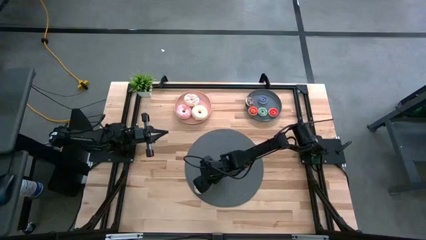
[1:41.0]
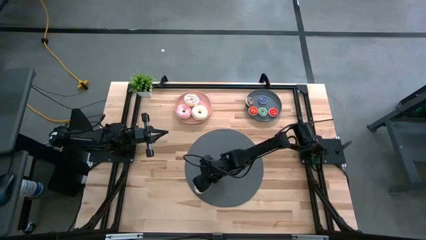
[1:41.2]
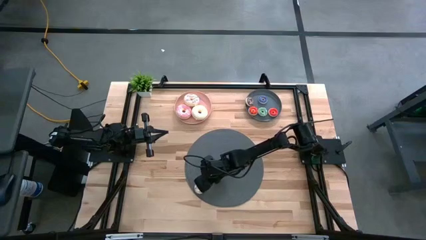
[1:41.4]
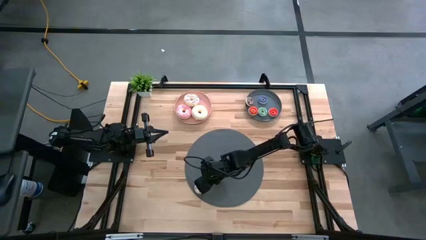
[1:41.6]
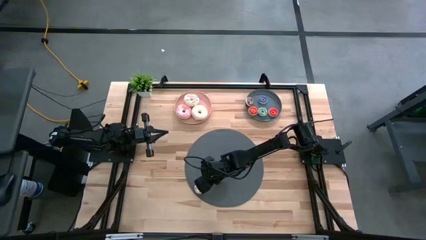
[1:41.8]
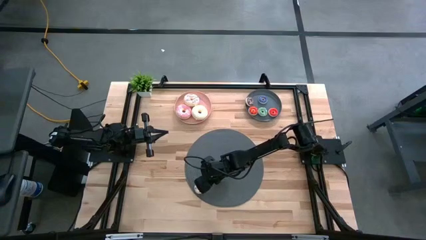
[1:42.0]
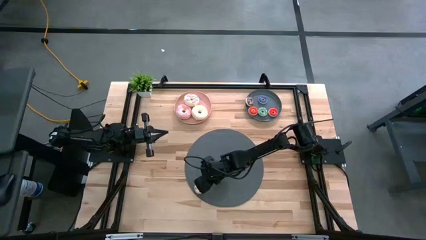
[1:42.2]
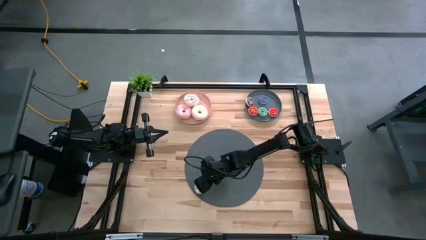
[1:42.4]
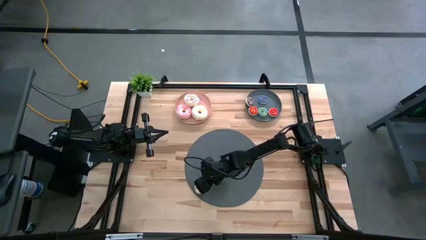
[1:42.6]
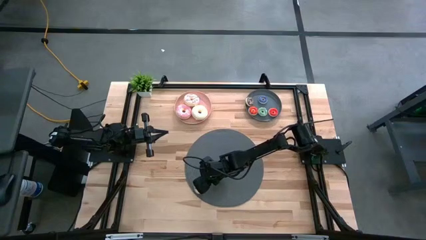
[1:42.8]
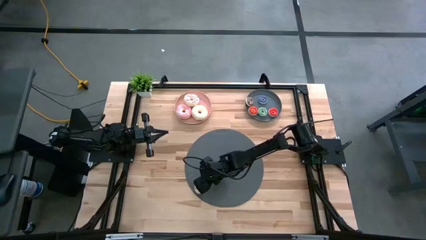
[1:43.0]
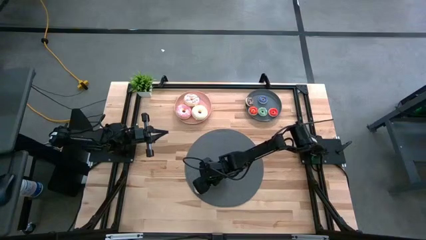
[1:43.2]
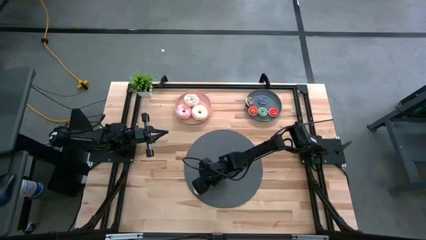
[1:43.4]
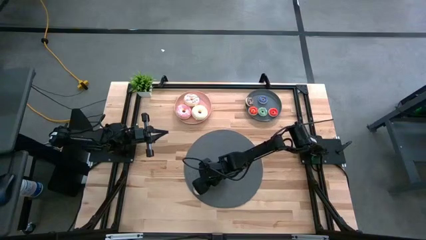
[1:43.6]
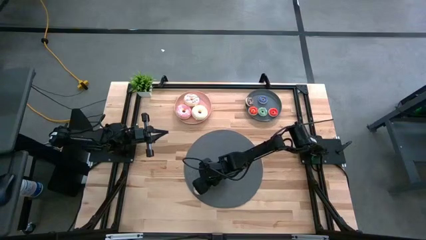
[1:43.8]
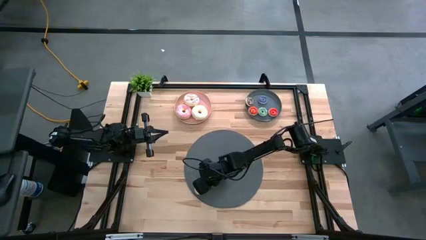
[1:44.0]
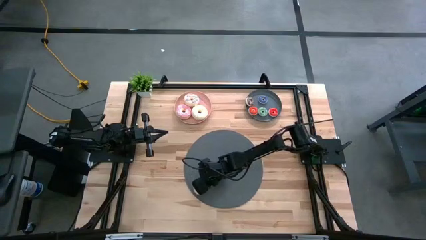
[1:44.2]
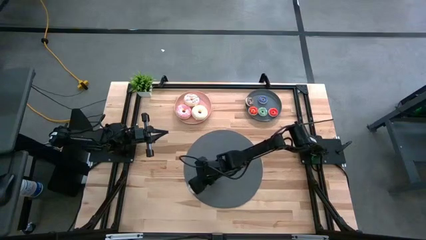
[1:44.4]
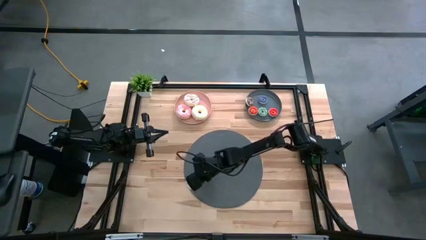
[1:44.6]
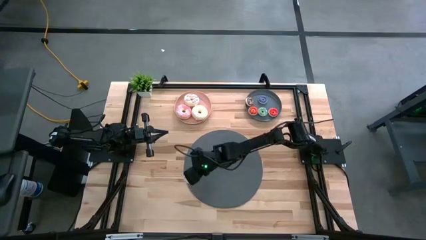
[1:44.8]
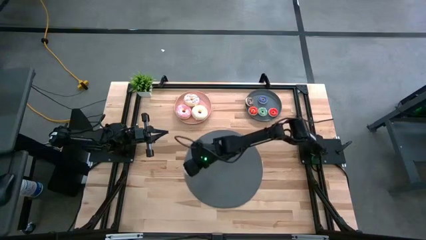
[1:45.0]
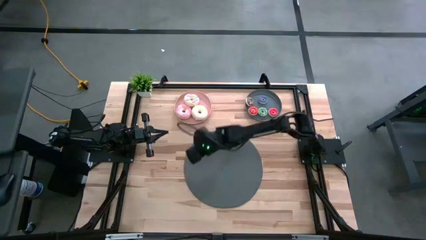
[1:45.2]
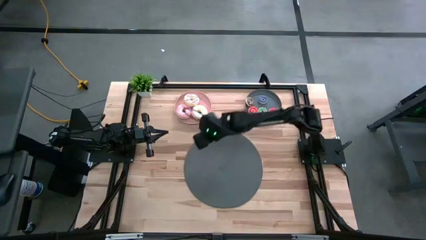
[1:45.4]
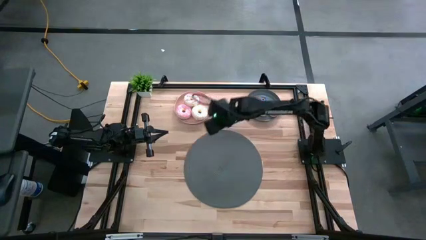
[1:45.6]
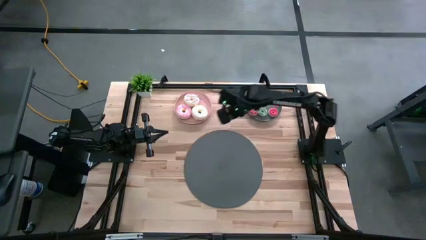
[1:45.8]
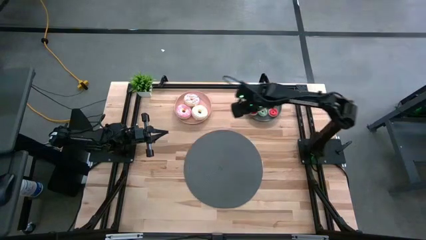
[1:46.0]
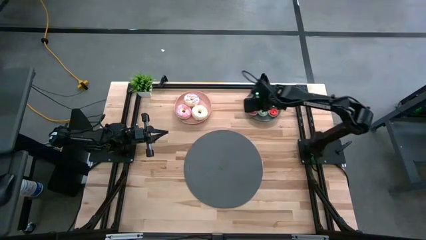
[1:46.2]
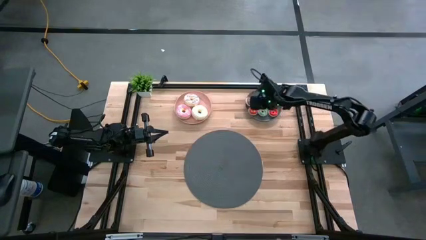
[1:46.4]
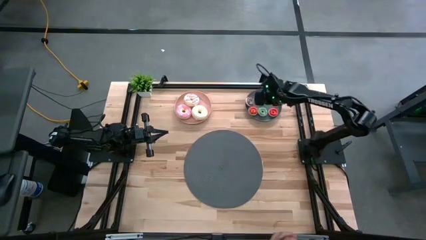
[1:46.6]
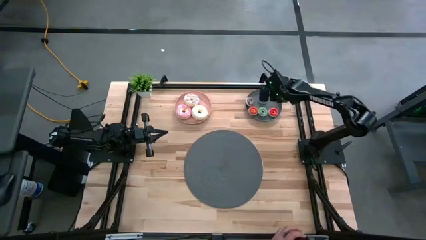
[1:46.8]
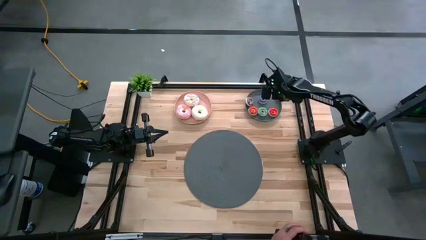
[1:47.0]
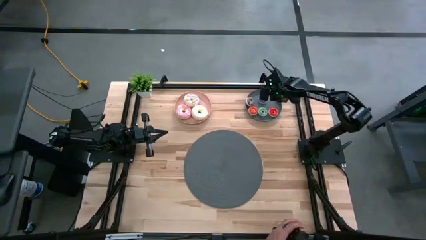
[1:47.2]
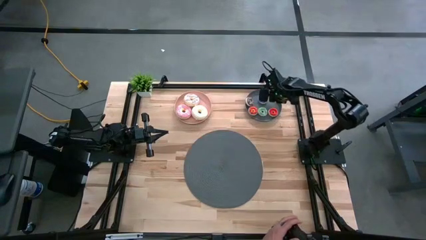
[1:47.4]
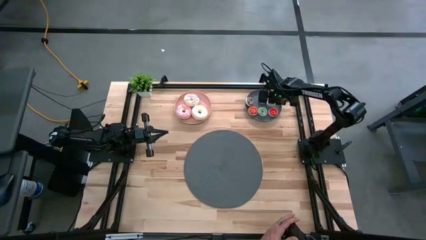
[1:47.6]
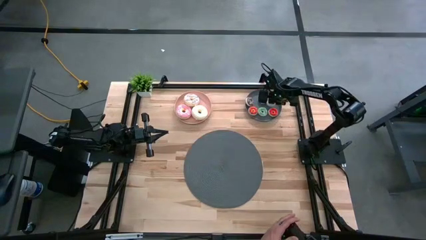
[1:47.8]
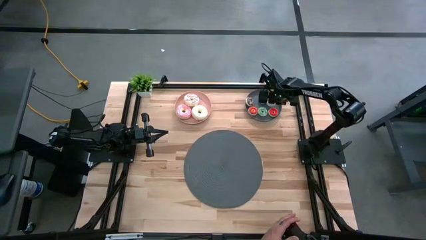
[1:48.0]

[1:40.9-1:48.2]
Task: Pick & Place donuts
Put the small white donut on the gray plate

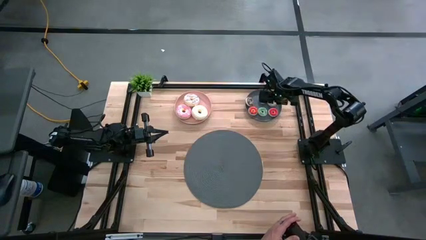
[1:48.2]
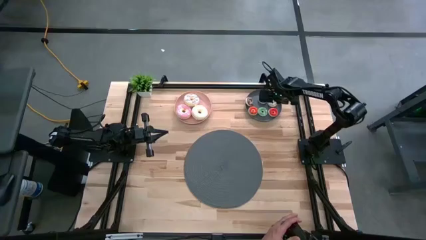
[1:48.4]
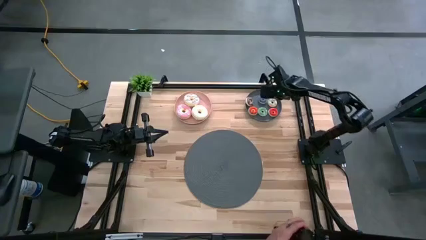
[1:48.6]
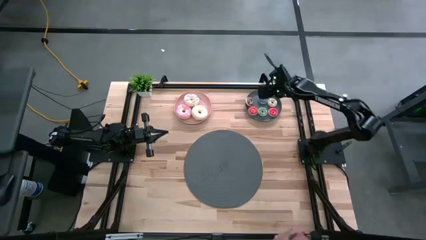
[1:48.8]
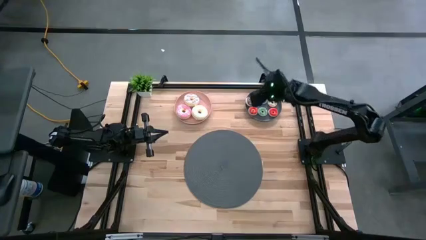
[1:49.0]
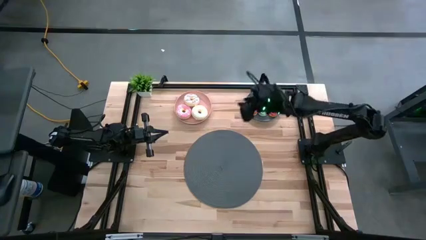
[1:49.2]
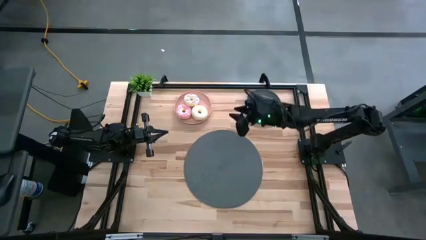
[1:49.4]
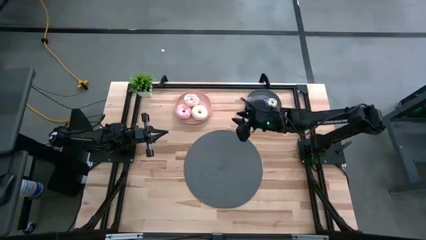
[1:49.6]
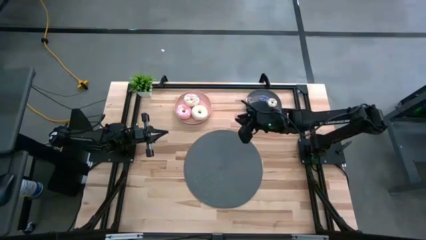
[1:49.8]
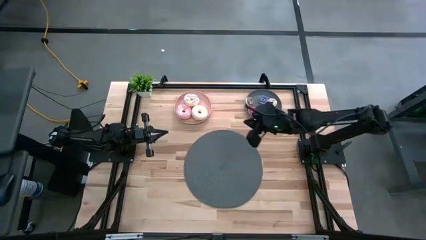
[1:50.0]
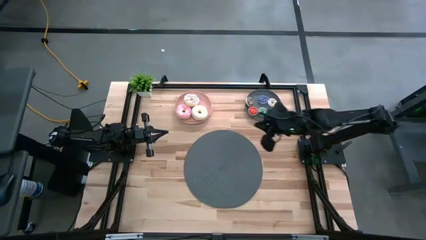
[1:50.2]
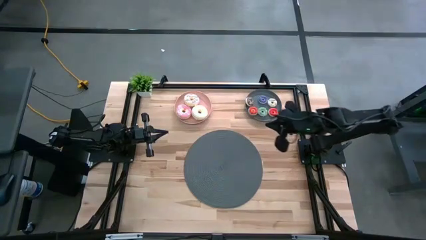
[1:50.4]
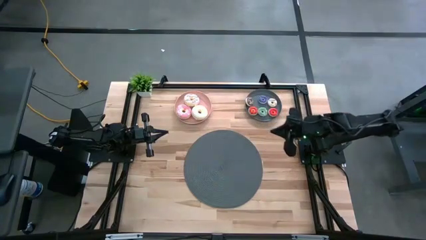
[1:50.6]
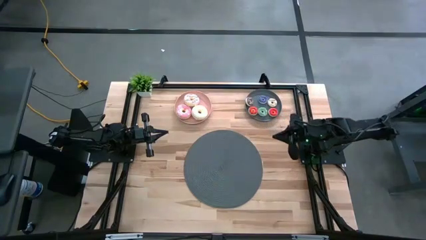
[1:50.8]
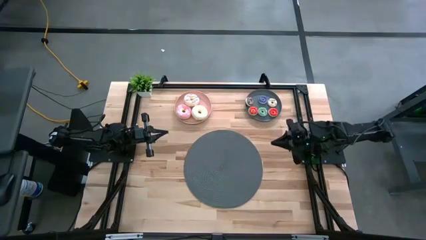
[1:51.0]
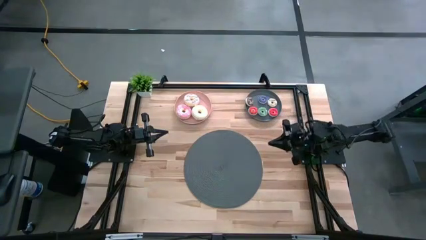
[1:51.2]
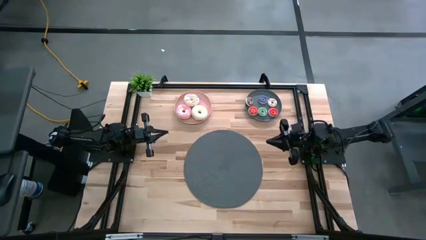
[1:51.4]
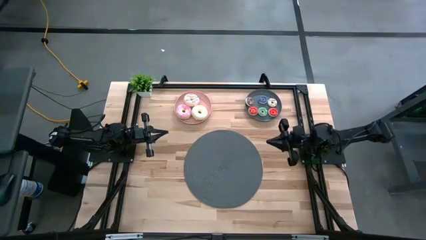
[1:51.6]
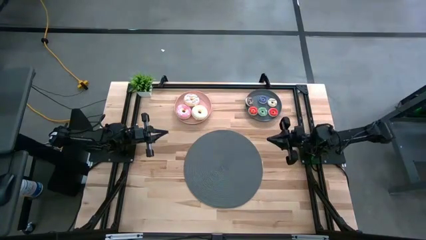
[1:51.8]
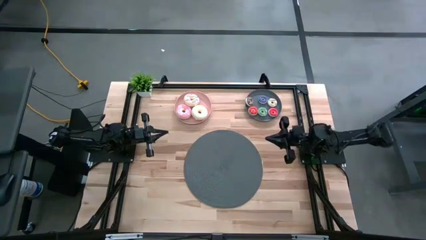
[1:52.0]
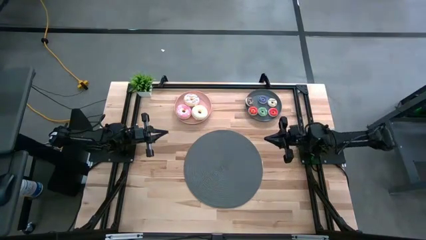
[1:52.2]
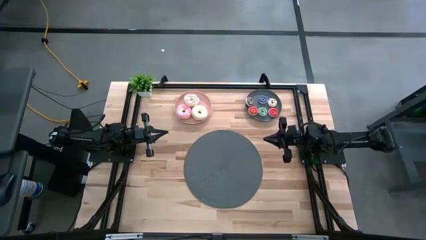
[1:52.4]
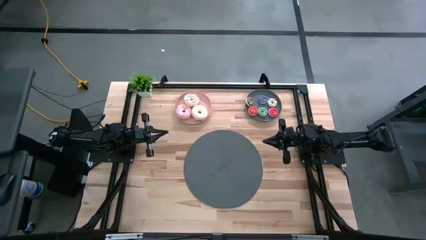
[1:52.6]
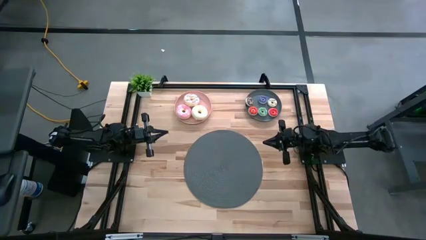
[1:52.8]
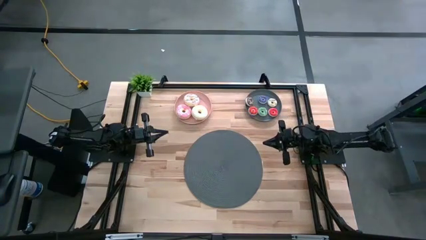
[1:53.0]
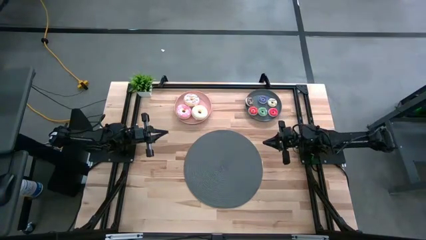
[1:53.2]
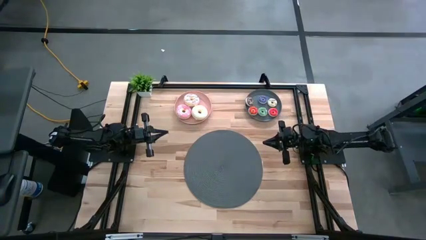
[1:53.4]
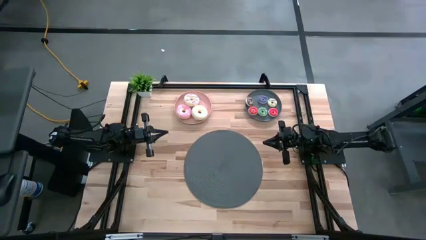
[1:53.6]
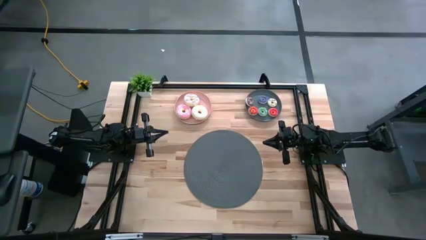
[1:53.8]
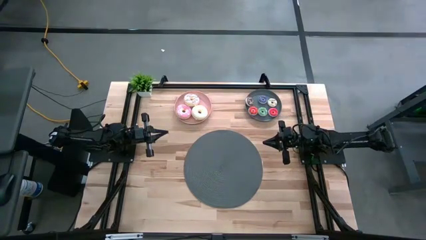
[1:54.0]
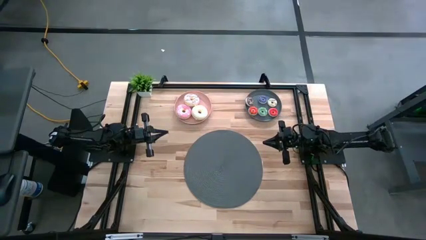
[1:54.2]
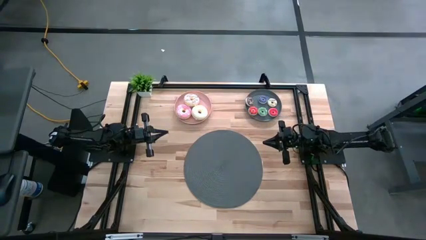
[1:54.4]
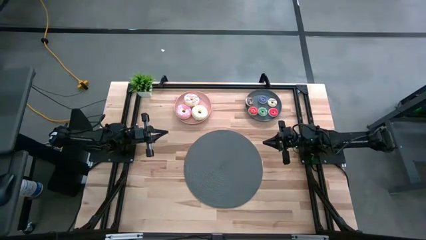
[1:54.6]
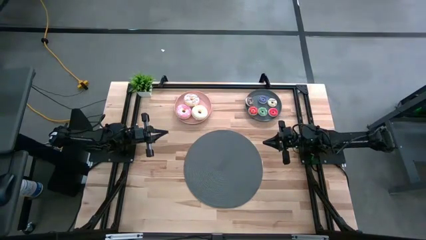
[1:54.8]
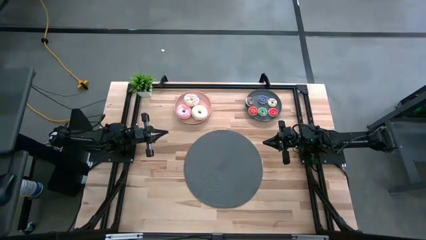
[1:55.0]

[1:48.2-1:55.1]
Return to Home Position

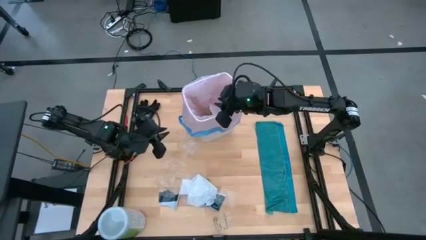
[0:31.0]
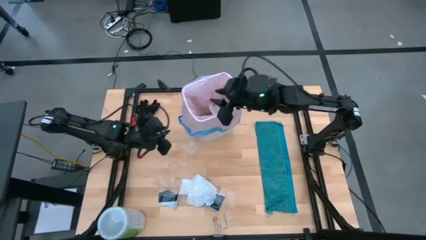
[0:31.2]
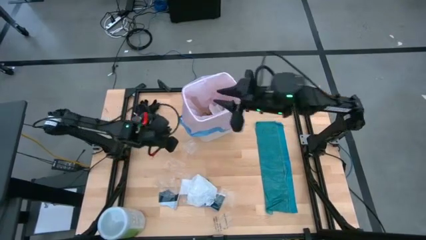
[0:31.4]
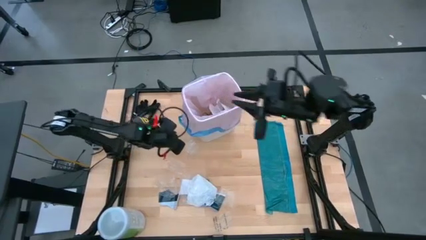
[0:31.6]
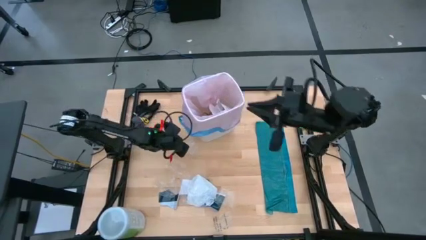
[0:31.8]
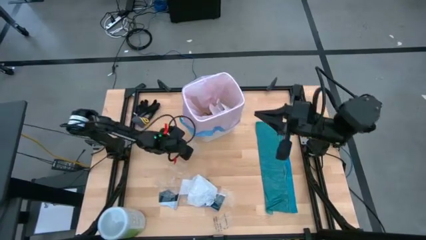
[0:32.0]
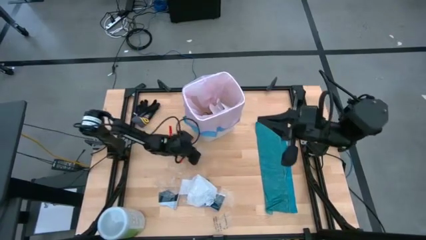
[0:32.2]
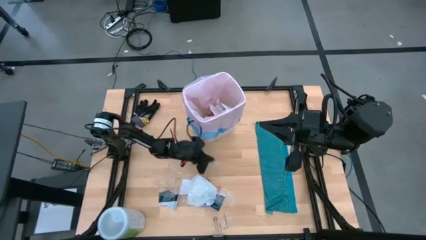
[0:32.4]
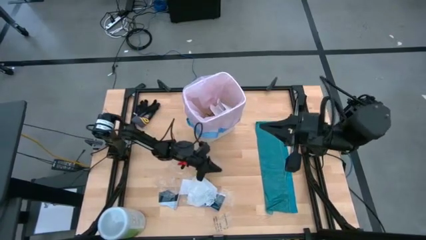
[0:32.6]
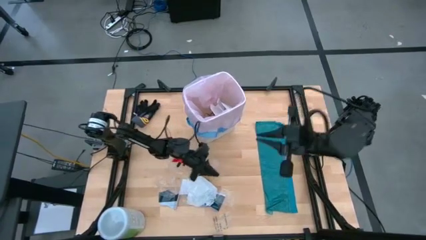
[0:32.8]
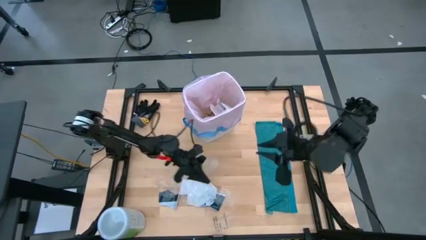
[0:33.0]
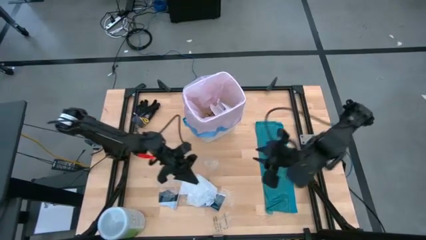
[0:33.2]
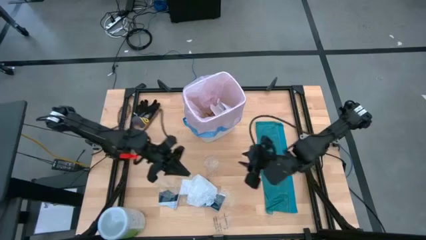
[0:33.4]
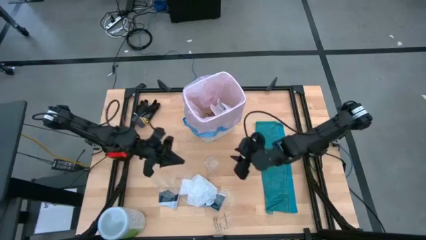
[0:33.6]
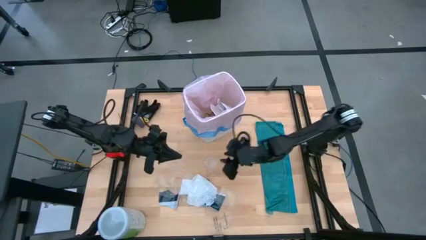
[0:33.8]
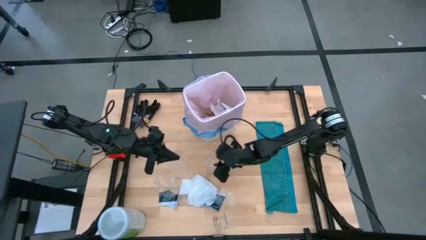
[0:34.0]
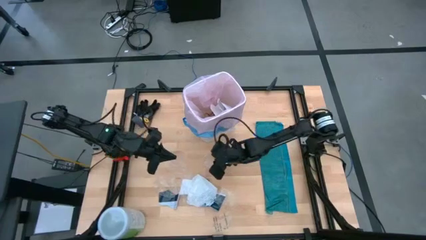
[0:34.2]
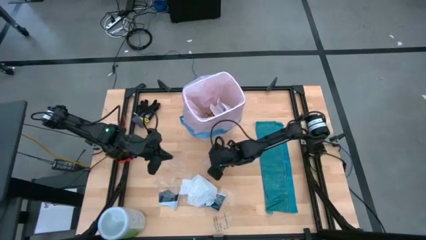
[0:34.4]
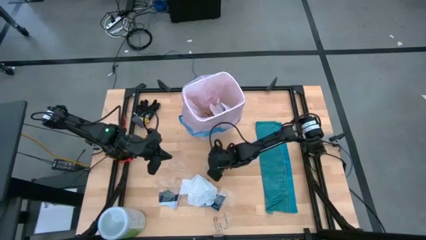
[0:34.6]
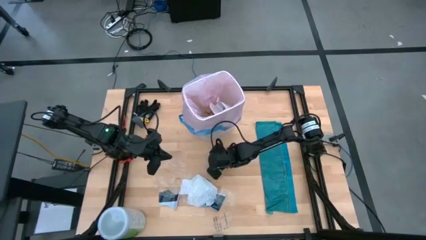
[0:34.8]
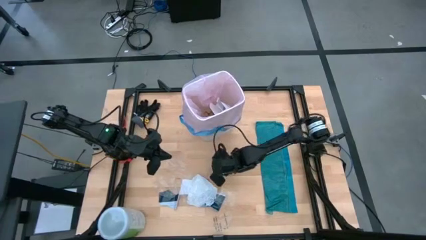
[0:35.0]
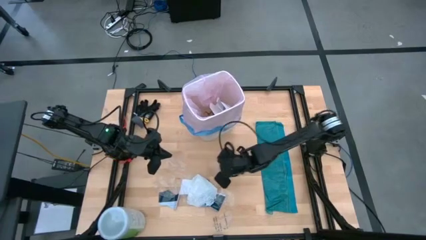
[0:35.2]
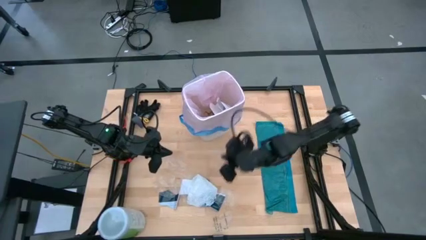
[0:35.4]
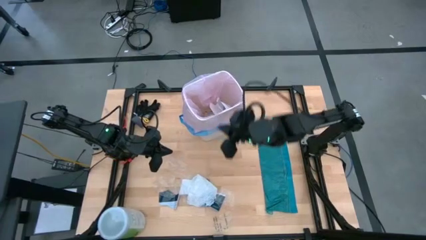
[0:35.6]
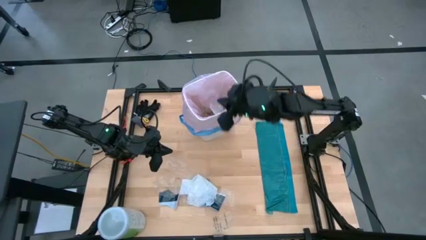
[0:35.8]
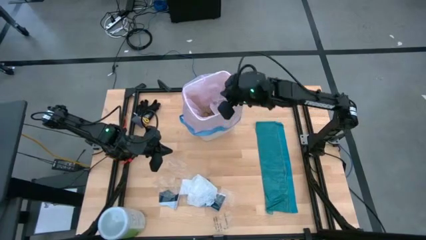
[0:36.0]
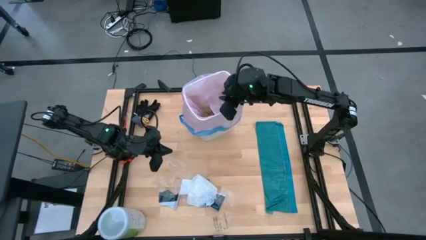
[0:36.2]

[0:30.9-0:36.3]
Task: place trash/remove bag and relplace
Put the transparent plastic into the white trash bin
